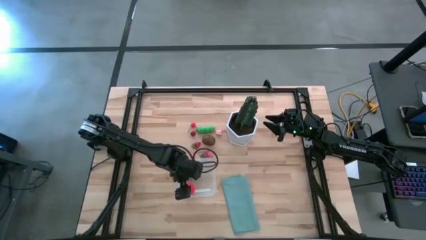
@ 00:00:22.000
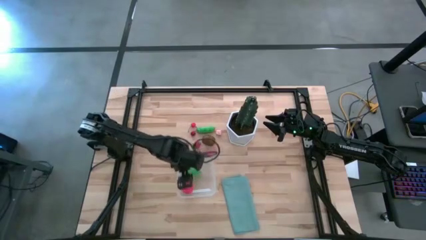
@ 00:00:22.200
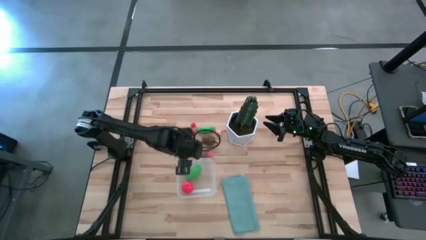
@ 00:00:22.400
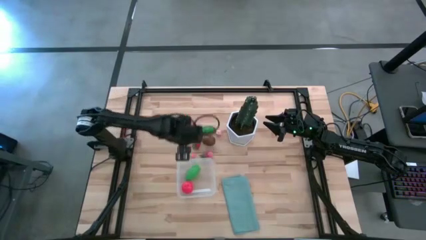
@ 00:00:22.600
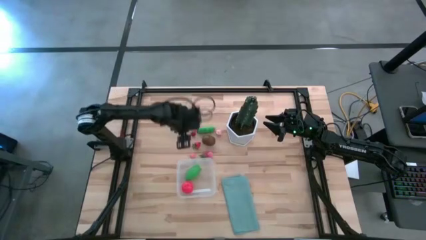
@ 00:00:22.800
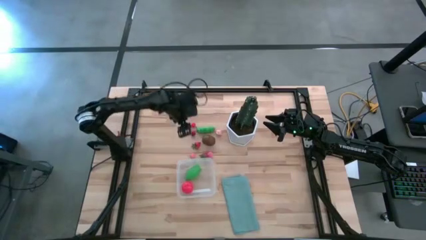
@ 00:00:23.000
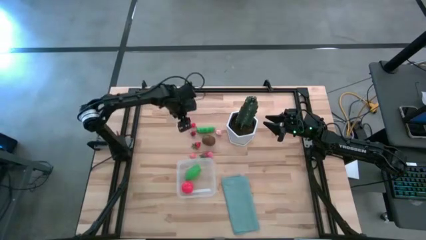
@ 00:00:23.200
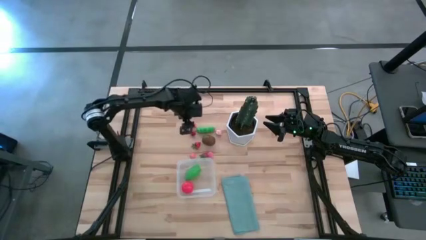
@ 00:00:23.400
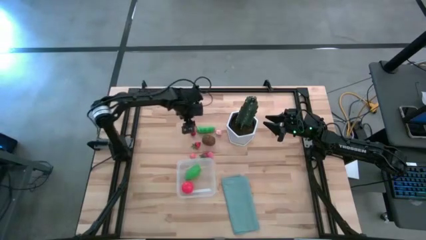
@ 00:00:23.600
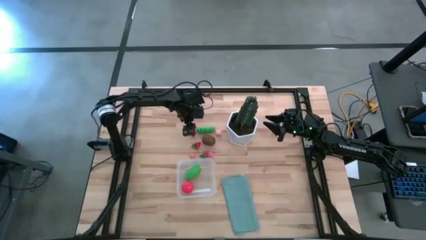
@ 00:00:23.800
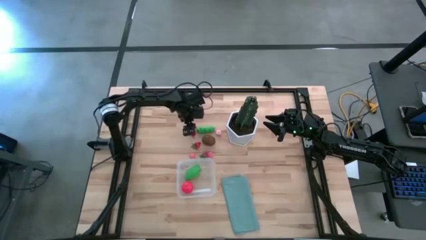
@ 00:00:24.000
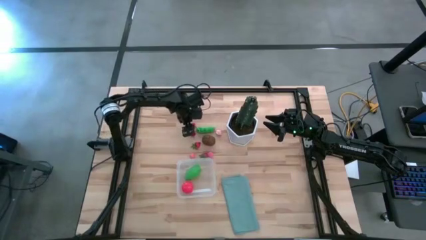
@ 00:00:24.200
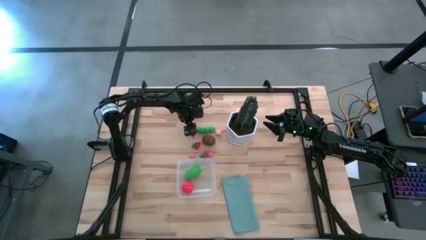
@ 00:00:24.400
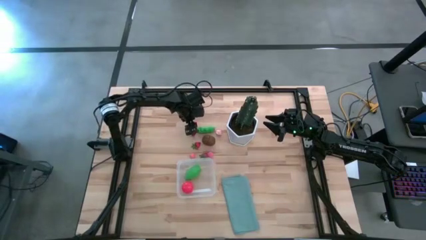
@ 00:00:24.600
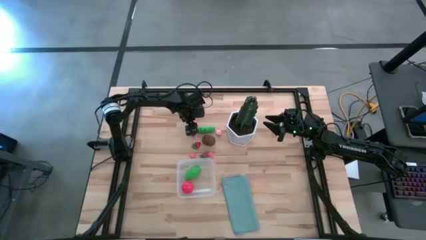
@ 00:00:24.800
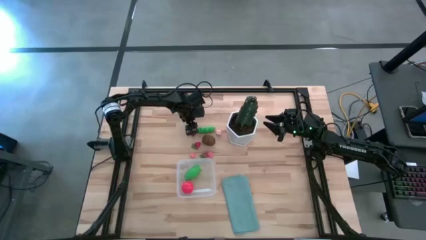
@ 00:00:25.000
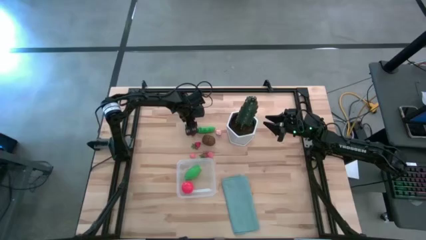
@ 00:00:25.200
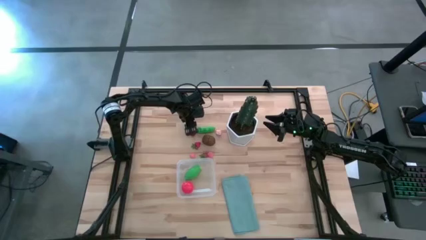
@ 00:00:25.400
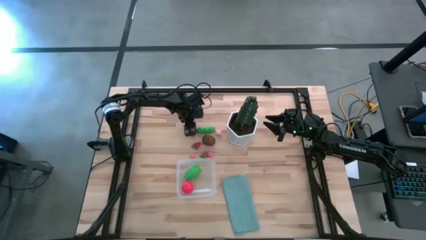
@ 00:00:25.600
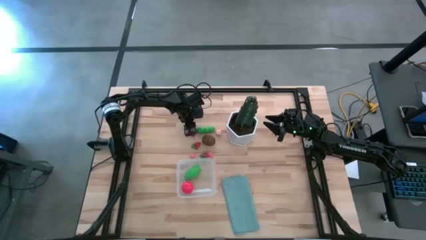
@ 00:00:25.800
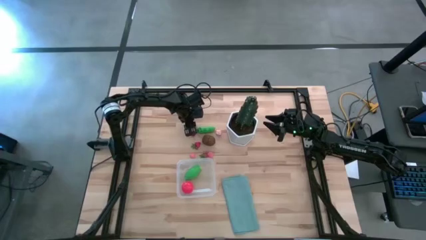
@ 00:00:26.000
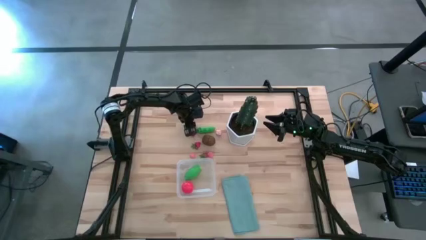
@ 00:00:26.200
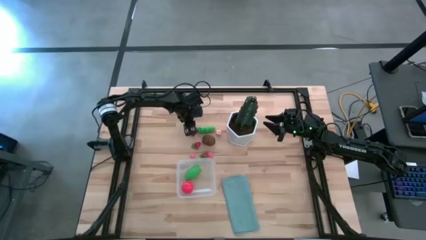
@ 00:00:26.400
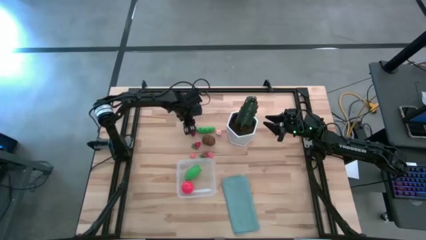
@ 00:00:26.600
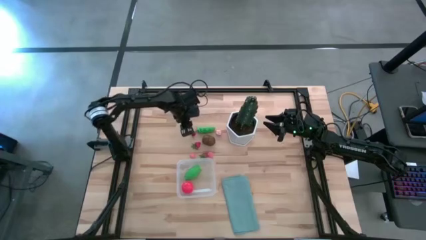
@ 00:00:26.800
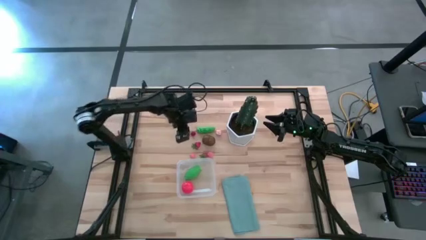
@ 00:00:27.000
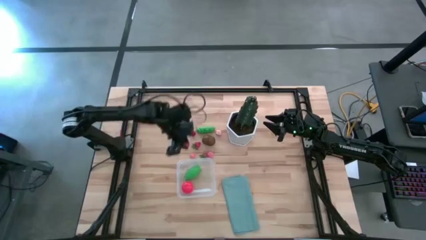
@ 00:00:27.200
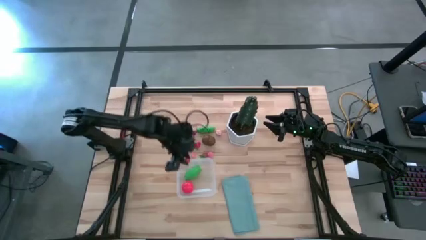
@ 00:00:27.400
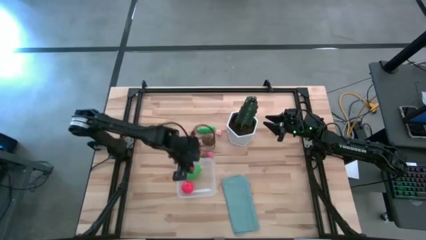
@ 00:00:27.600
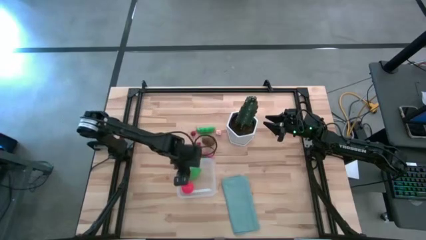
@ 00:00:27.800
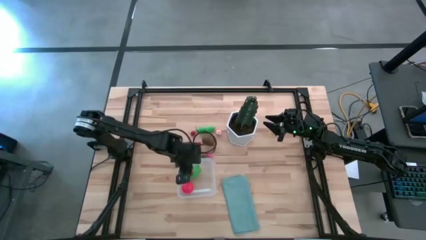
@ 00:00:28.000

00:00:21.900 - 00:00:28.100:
Task: Pick and placing Produce into tupperware
Put the red cherry into the transparent bin

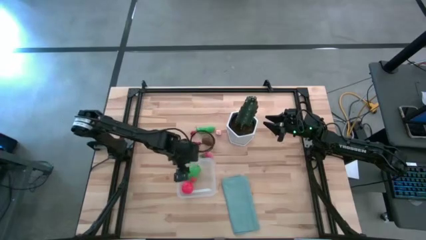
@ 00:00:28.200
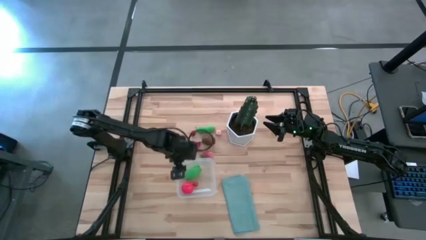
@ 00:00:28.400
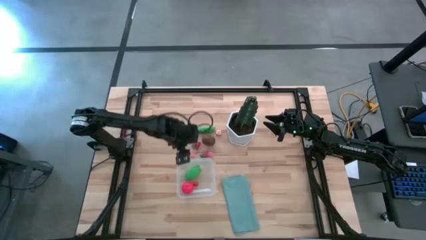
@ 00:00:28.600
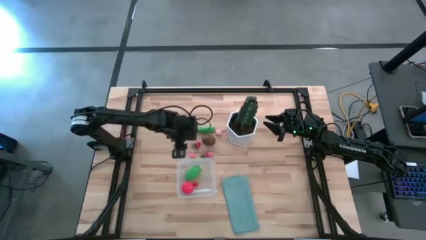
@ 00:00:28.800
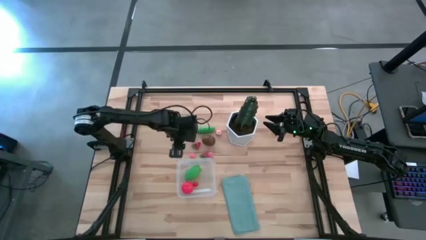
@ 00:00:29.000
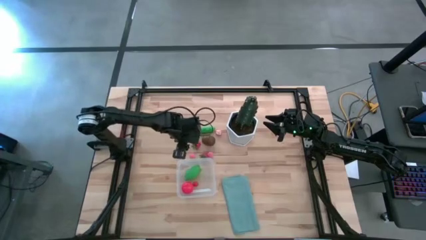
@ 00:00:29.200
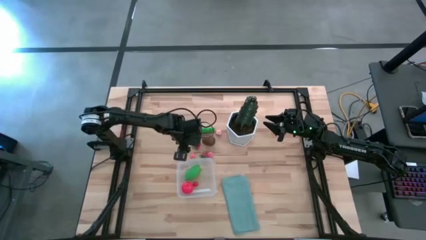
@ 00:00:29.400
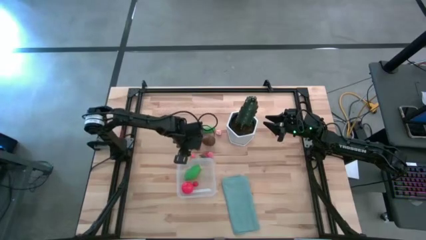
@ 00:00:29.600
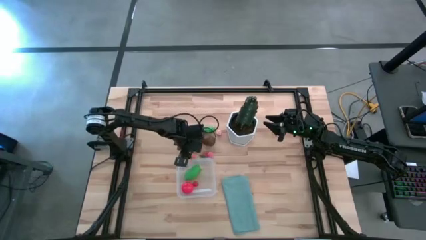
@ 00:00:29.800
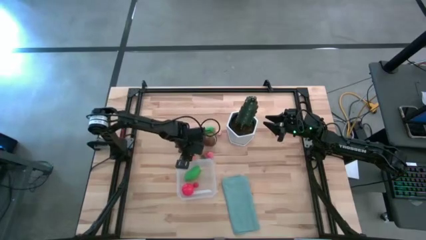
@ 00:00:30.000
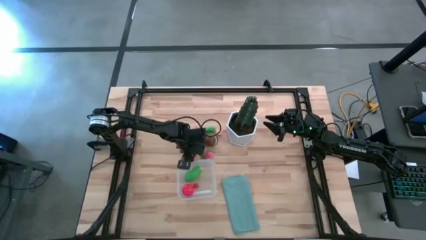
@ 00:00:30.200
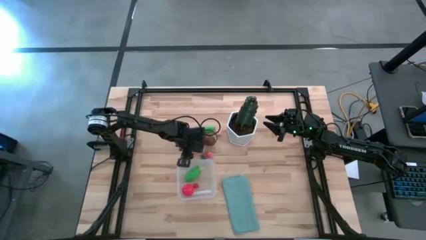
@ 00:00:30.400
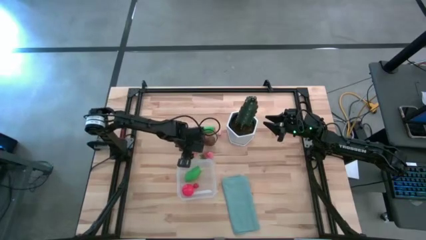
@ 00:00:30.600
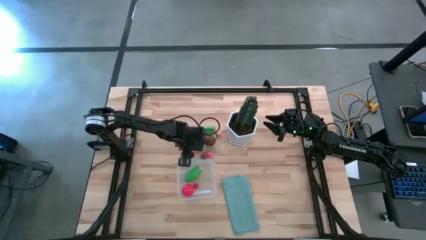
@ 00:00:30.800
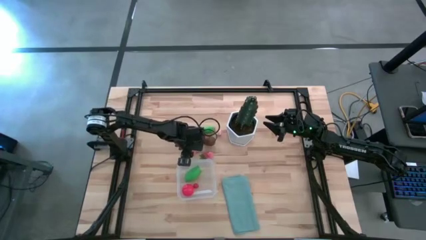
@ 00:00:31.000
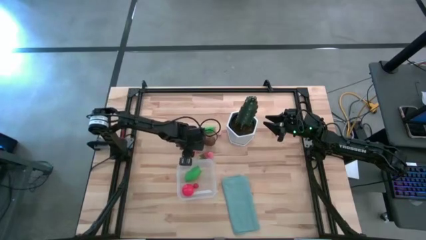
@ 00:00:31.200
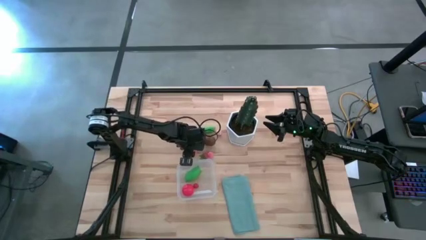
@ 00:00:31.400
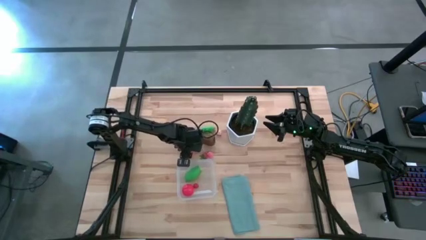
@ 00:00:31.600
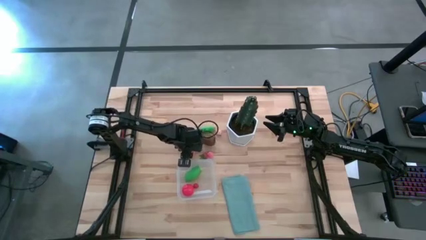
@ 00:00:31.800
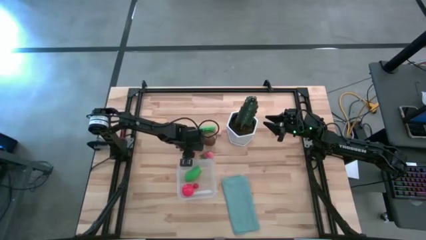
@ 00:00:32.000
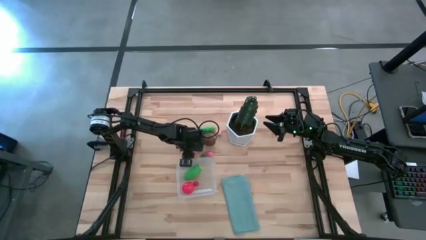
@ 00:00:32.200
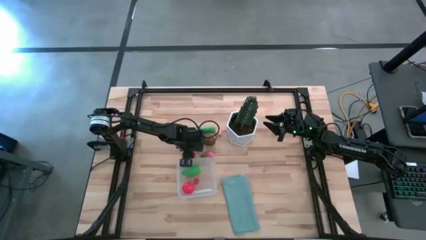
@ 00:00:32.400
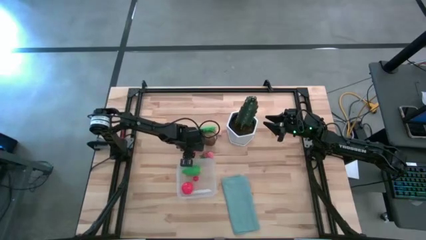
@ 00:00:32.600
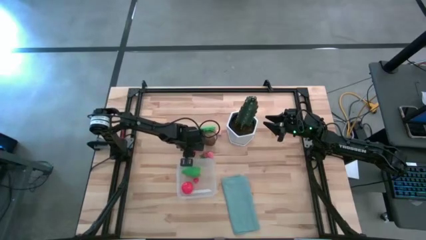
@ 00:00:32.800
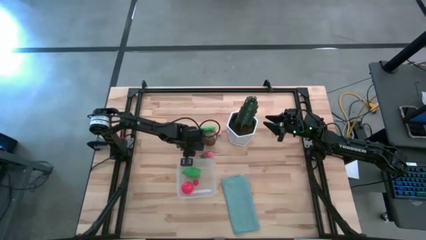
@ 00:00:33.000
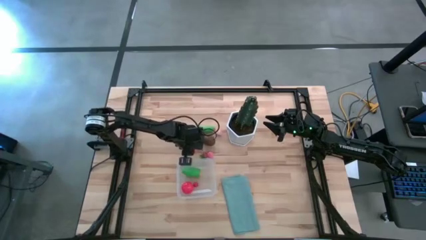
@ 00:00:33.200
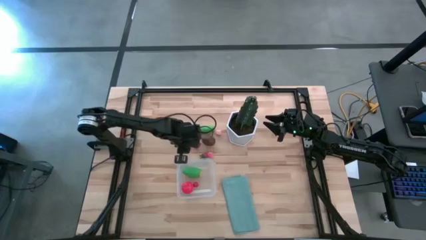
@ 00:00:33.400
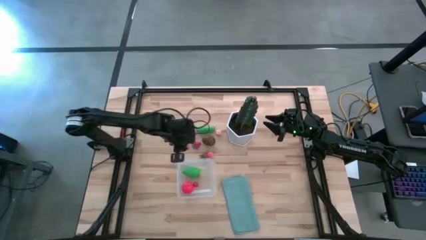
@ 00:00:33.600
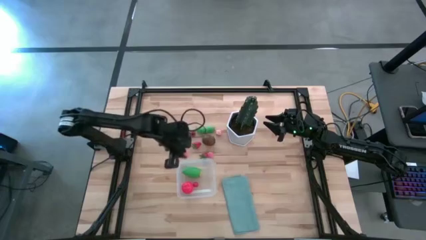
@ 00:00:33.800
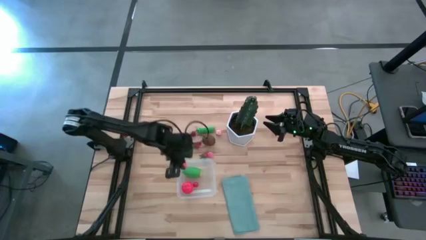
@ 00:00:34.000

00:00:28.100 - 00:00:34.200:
Put the pink peach into the transparent bin

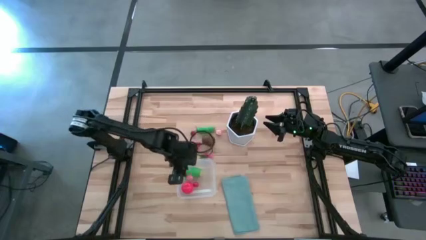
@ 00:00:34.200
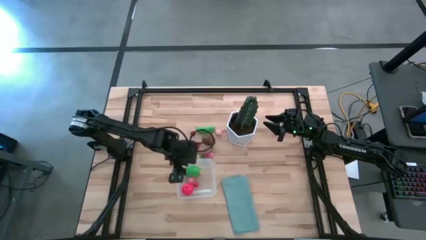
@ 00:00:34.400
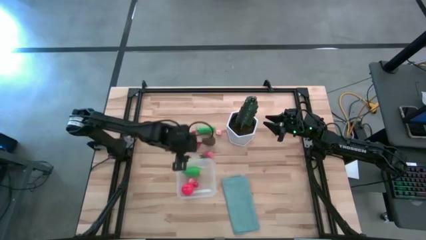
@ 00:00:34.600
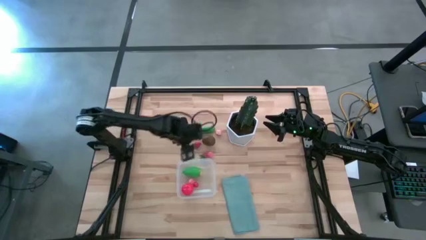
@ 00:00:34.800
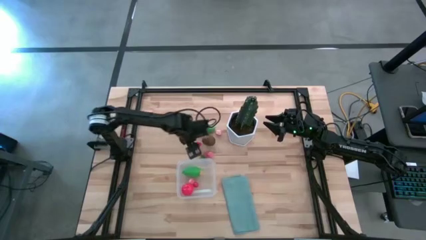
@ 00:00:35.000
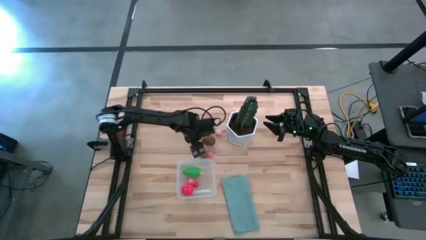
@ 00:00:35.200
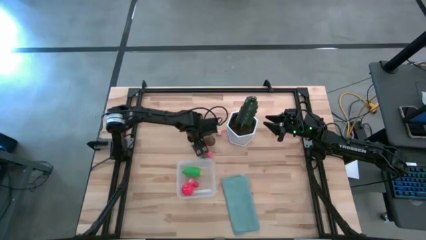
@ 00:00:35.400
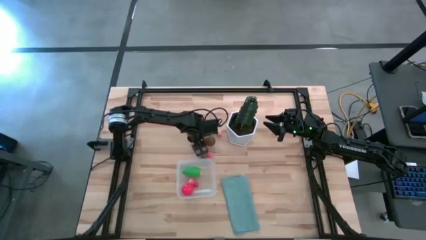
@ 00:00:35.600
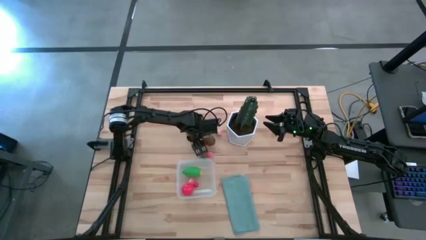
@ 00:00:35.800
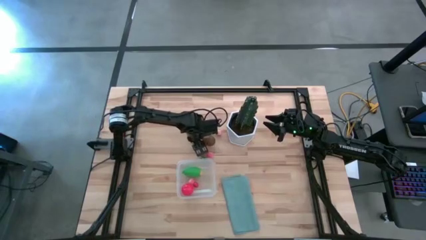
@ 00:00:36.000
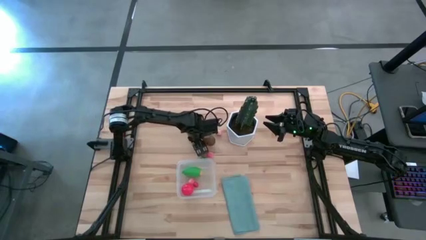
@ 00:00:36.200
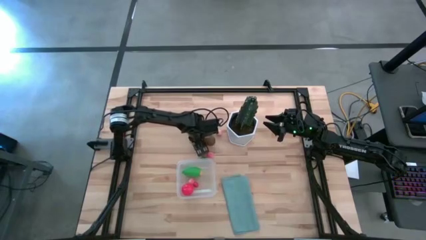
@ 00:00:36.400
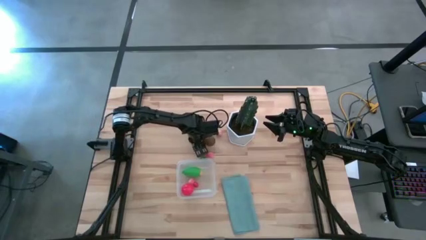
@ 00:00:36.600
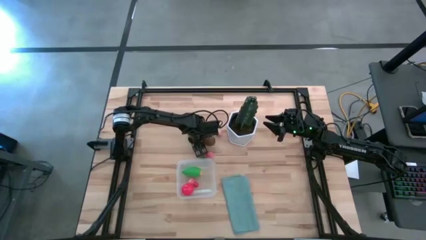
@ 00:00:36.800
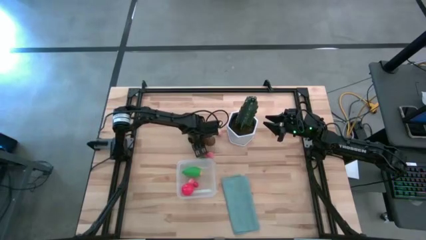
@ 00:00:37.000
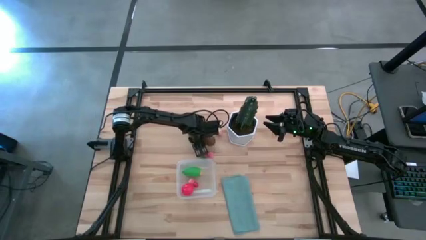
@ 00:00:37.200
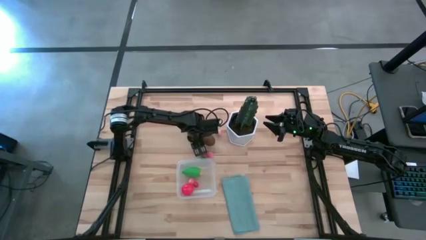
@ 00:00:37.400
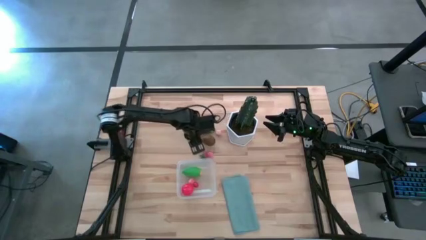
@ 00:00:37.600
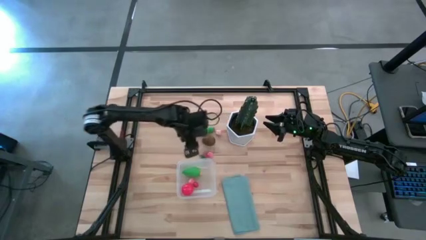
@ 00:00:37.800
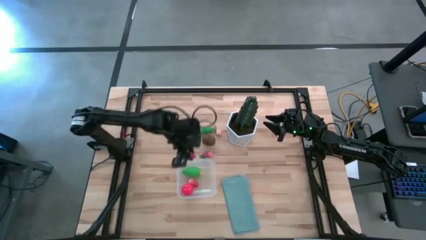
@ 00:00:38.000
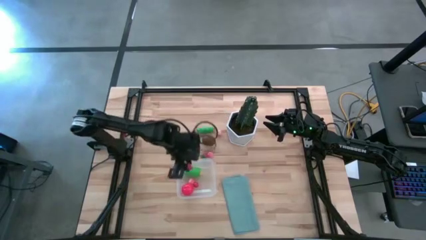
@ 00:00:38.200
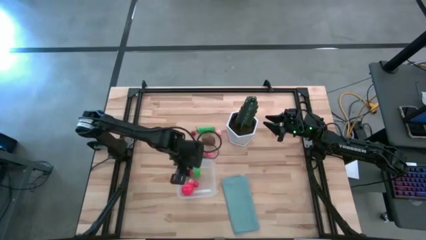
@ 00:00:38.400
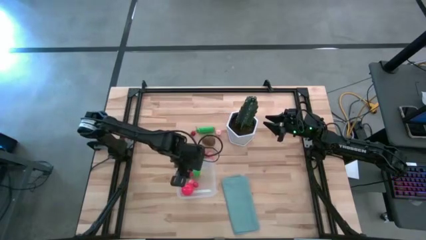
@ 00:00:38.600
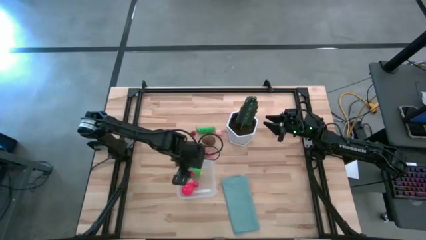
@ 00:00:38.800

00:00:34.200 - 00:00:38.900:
Put the red strawberry into the transparent bin
